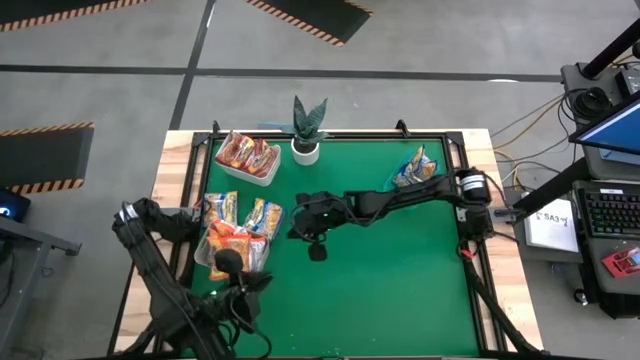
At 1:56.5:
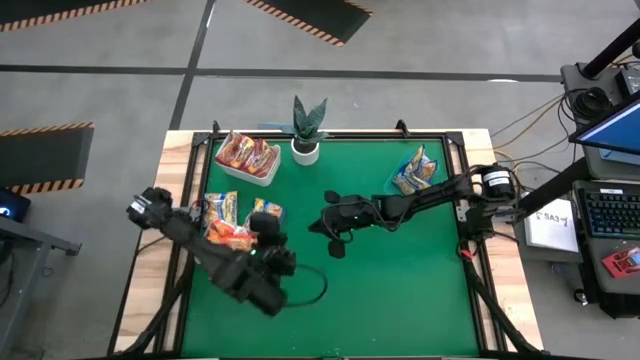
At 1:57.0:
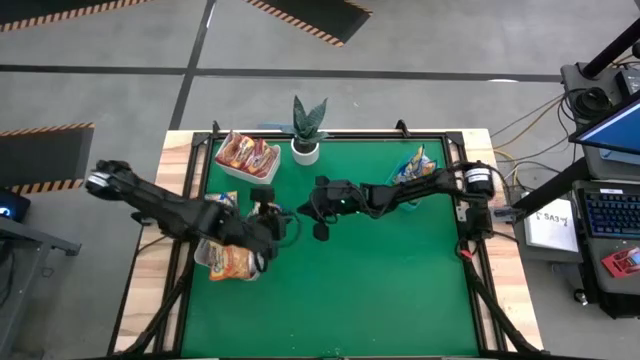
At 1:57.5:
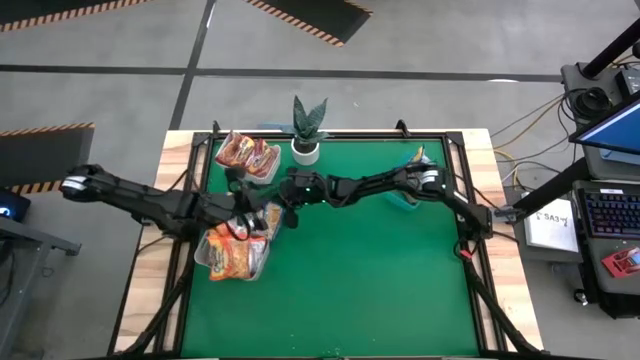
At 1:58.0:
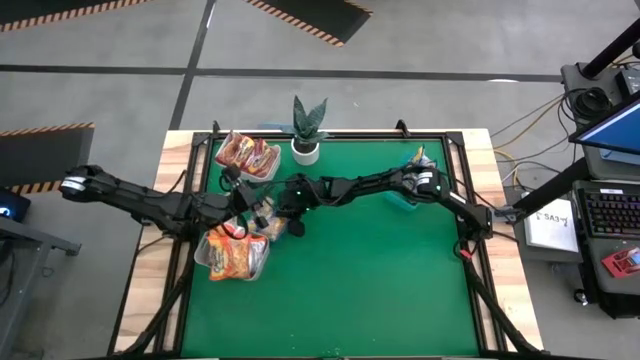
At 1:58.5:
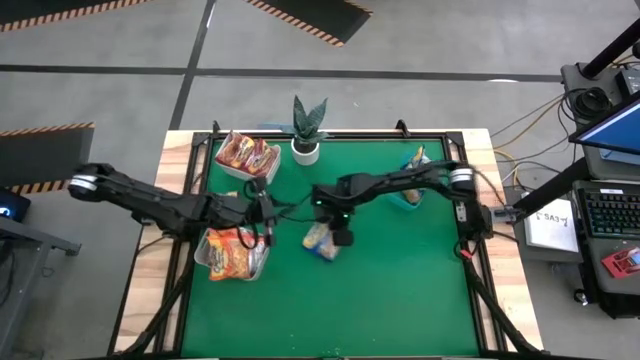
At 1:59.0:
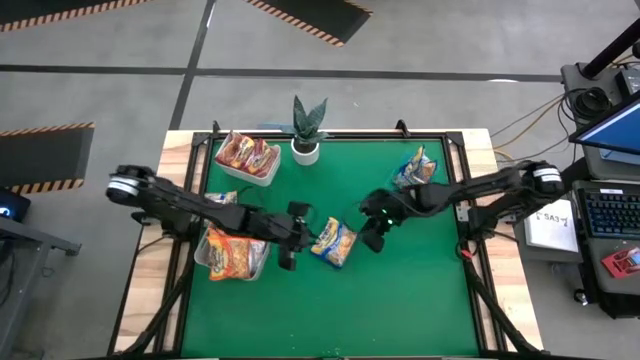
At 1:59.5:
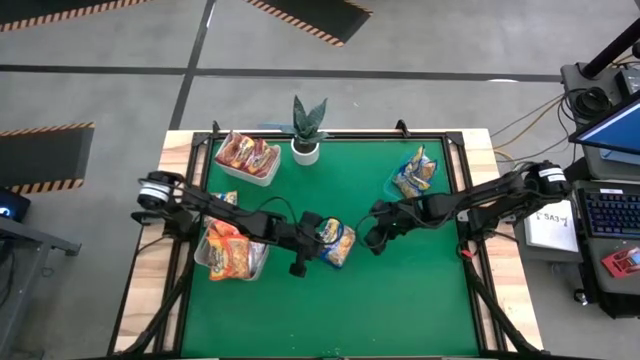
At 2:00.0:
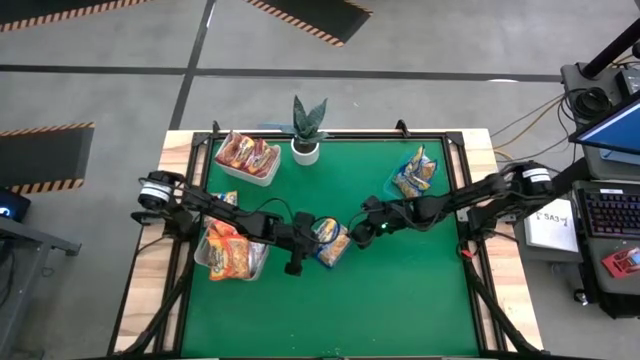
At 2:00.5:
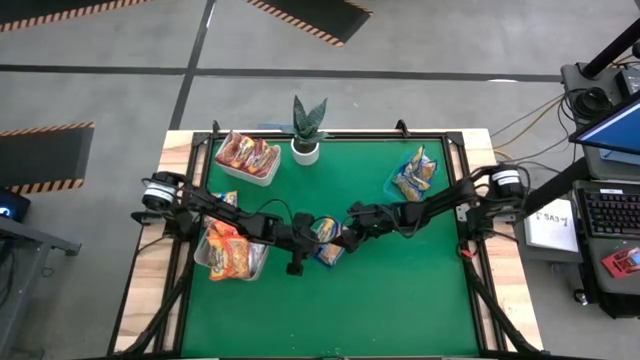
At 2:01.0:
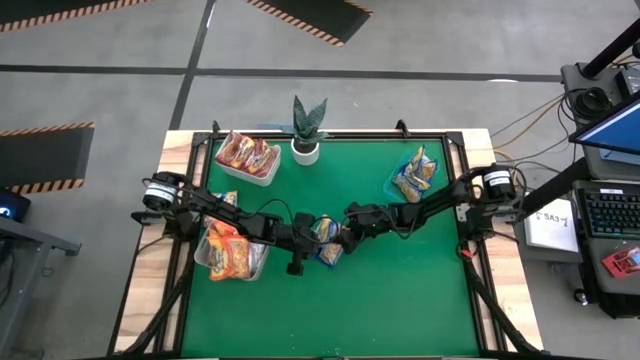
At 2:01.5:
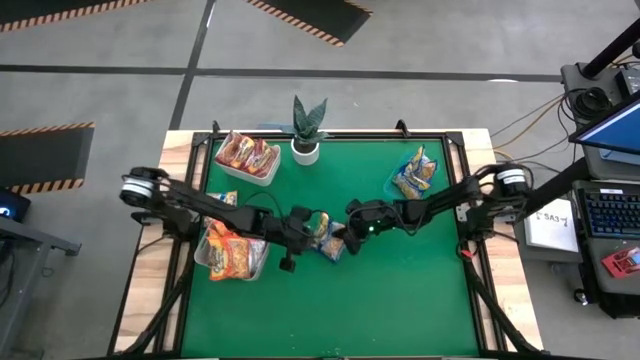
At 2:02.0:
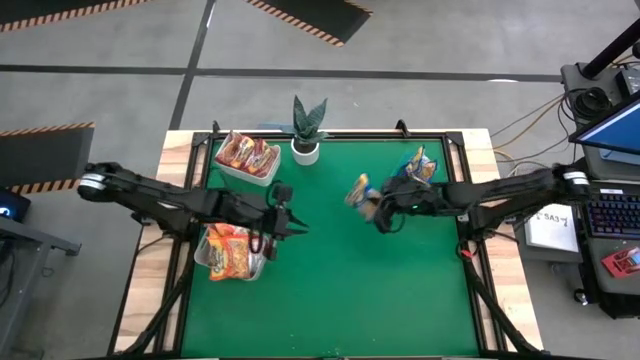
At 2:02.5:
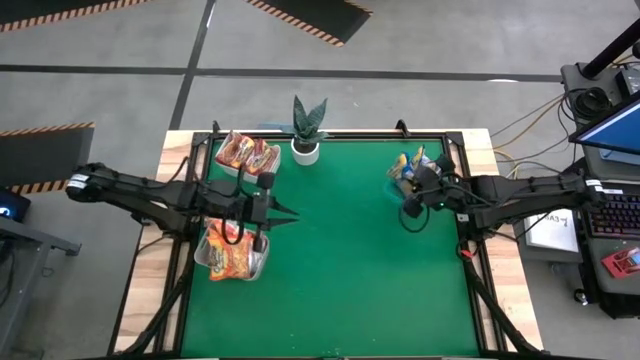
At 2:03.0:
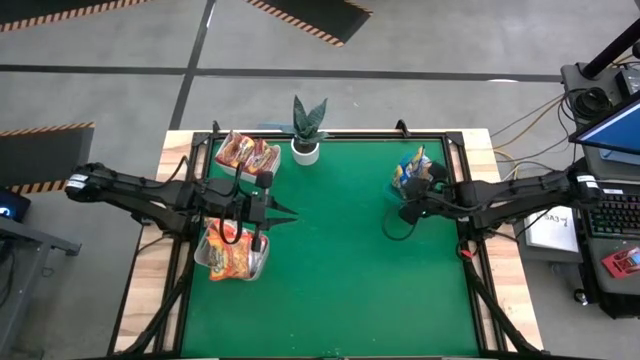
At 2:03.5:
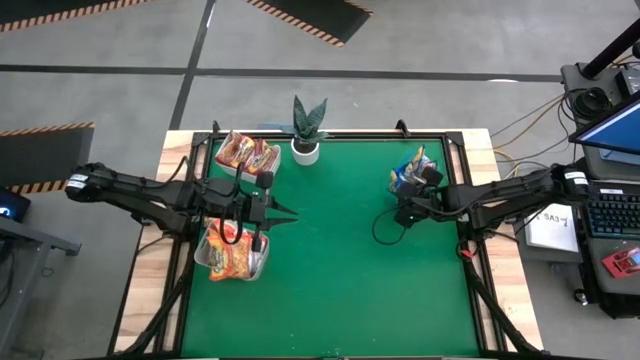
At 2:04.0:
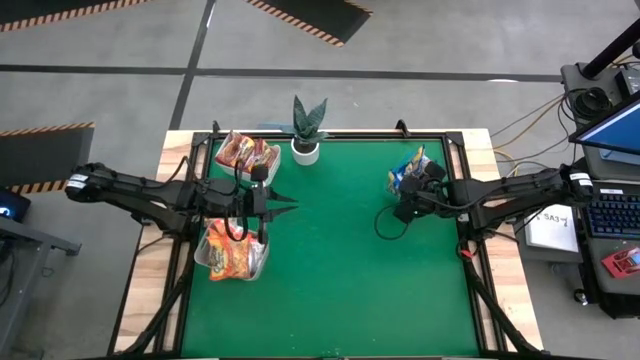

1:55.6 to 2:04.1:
Task: Sort Maruchan noodles
Put the blue noodle pack into the blue bin

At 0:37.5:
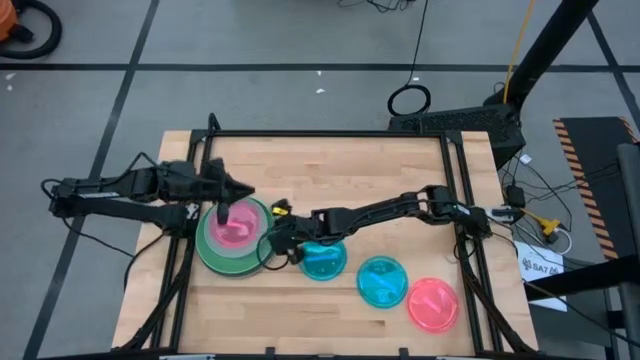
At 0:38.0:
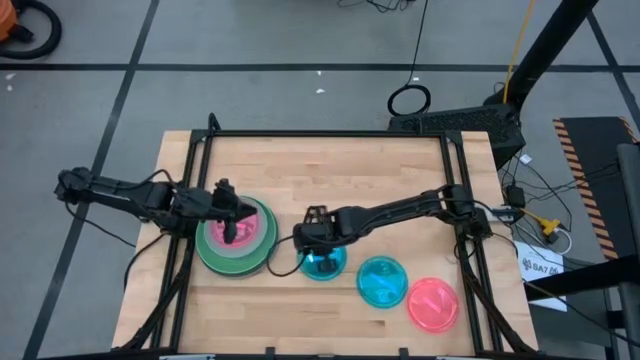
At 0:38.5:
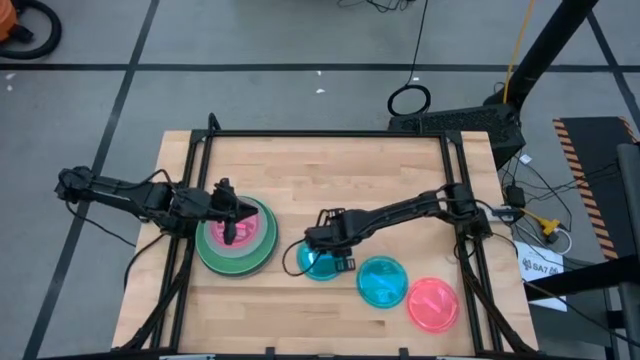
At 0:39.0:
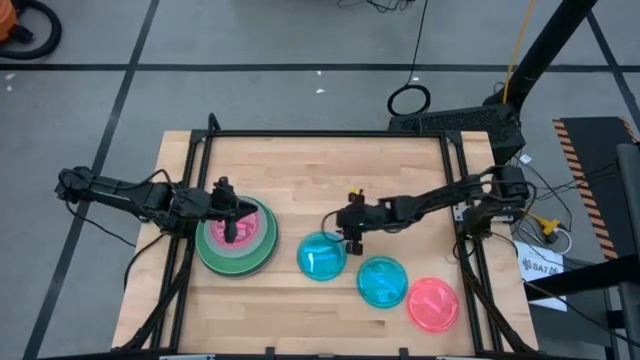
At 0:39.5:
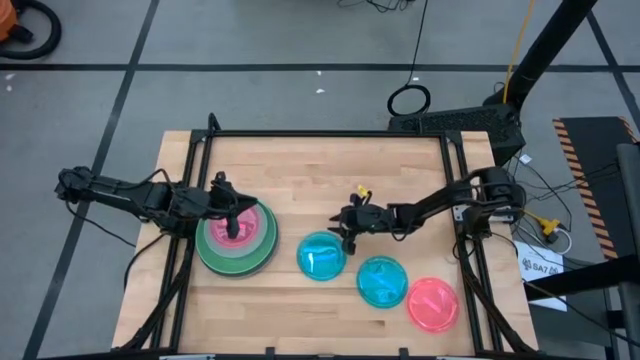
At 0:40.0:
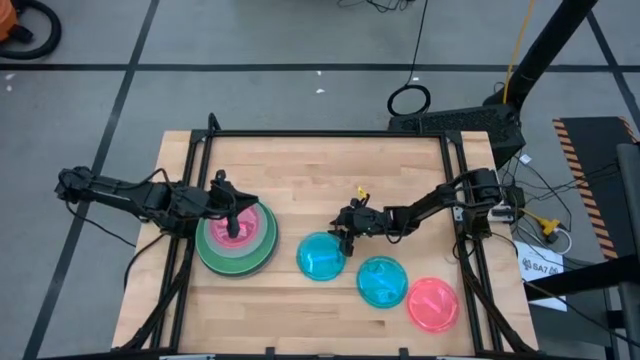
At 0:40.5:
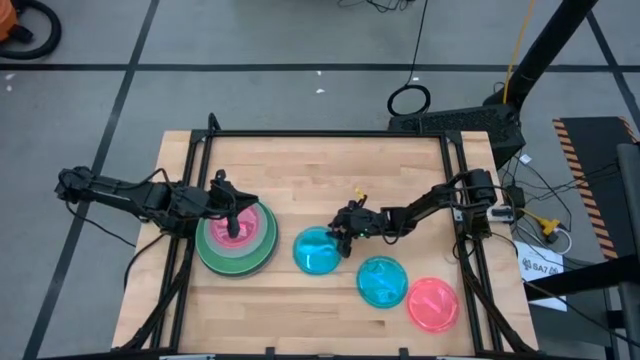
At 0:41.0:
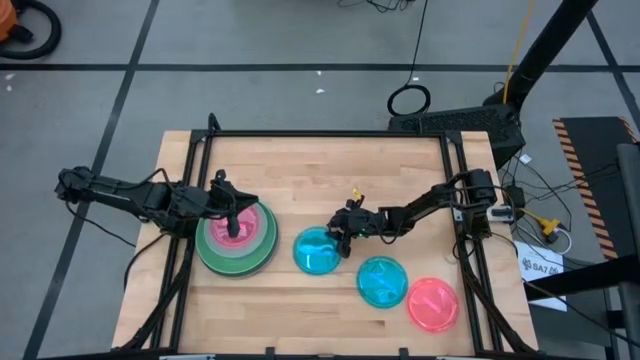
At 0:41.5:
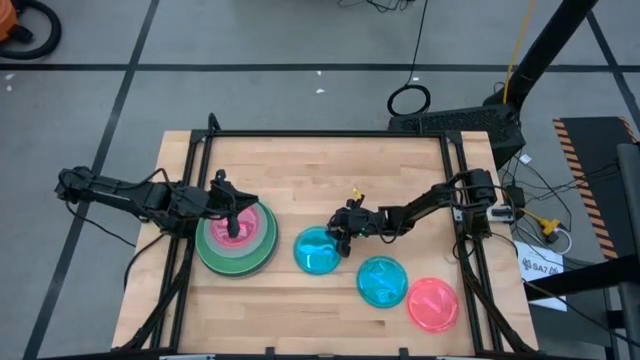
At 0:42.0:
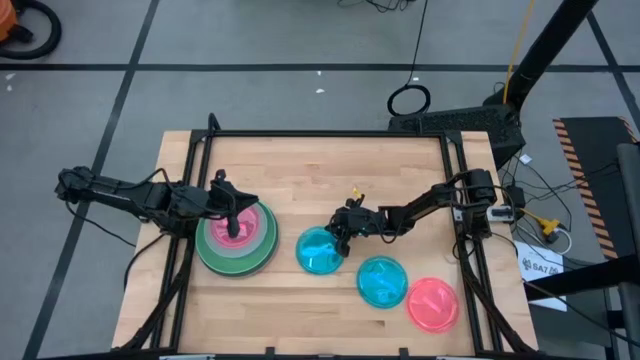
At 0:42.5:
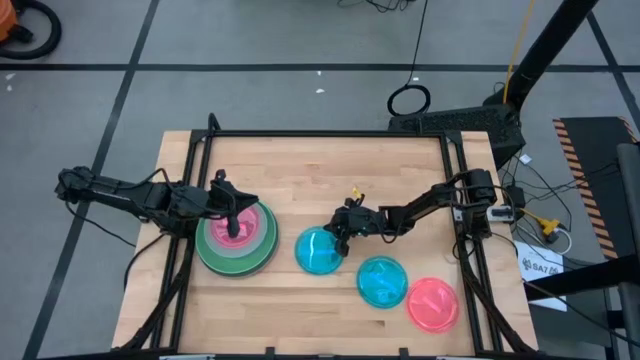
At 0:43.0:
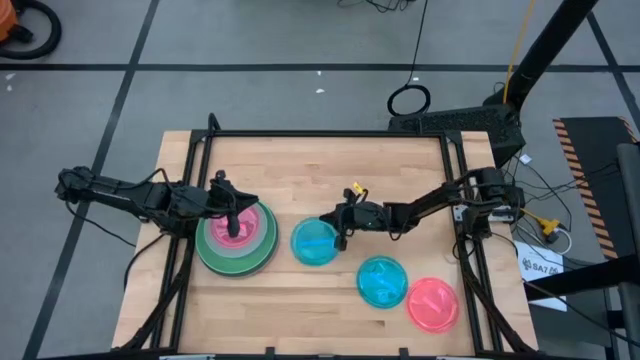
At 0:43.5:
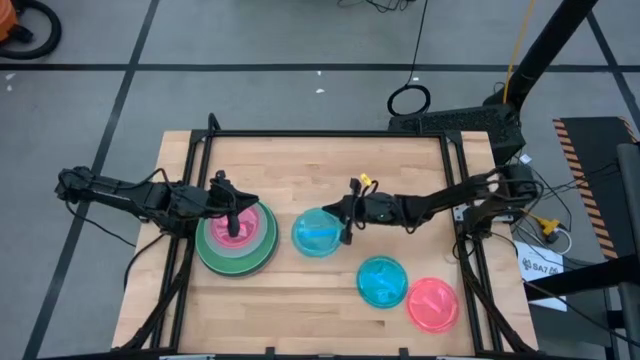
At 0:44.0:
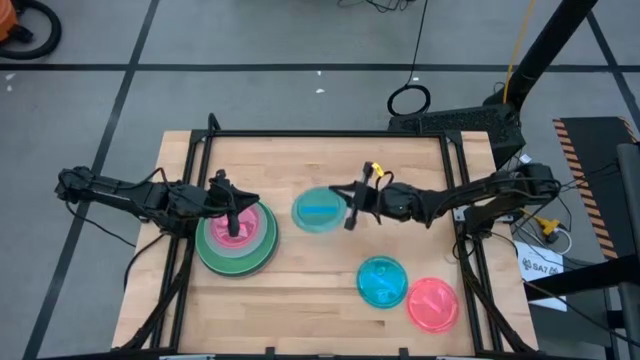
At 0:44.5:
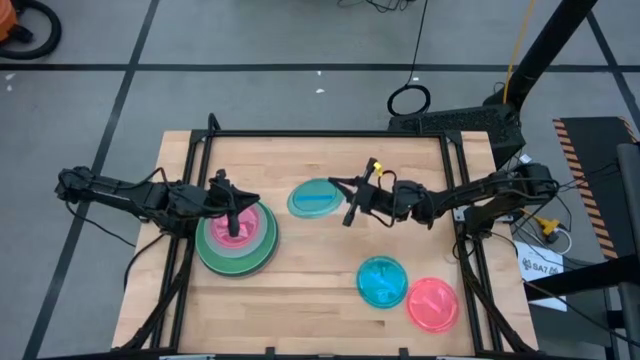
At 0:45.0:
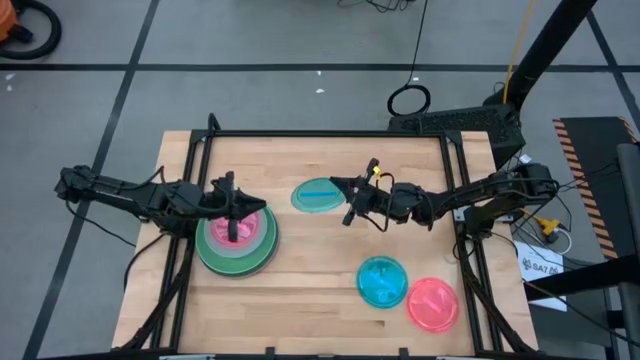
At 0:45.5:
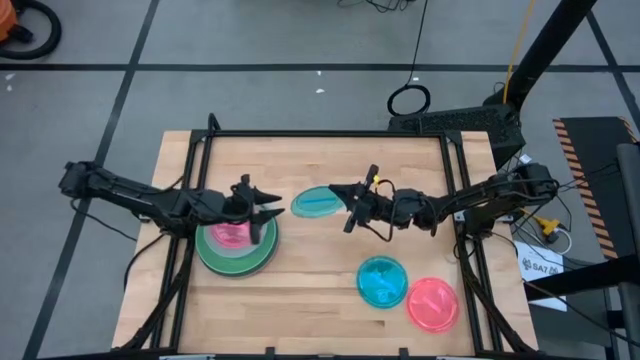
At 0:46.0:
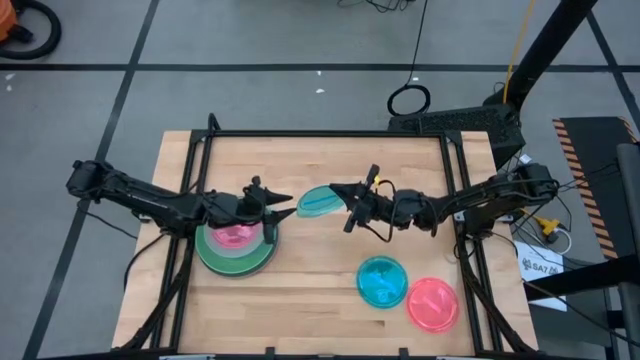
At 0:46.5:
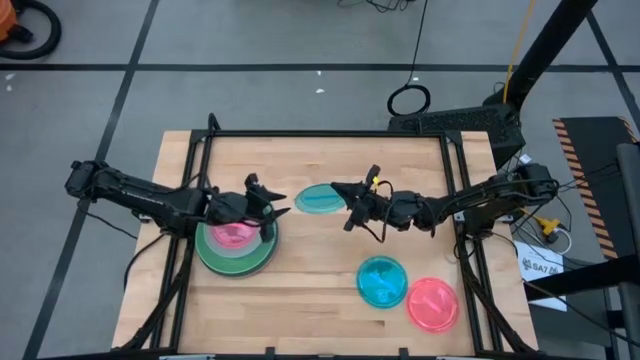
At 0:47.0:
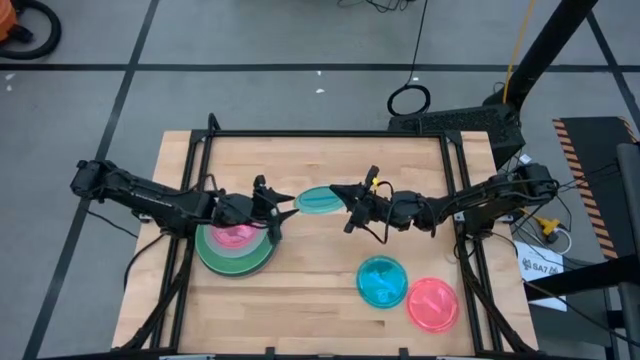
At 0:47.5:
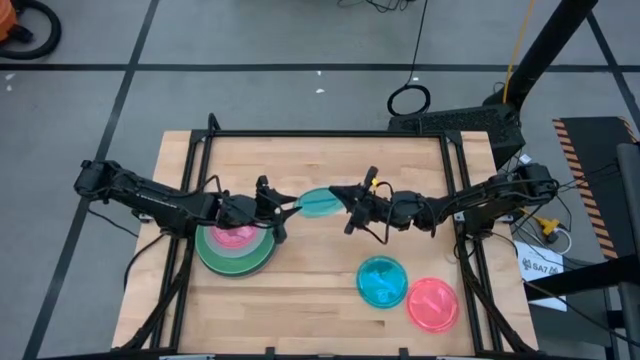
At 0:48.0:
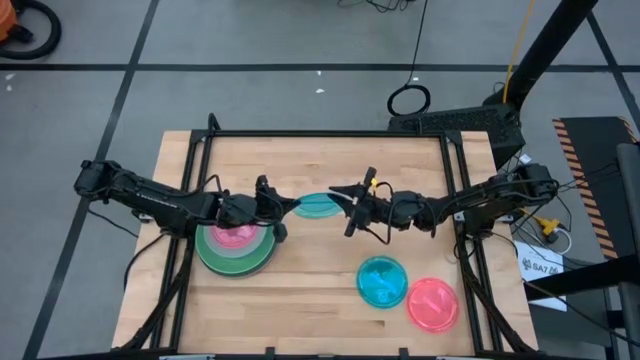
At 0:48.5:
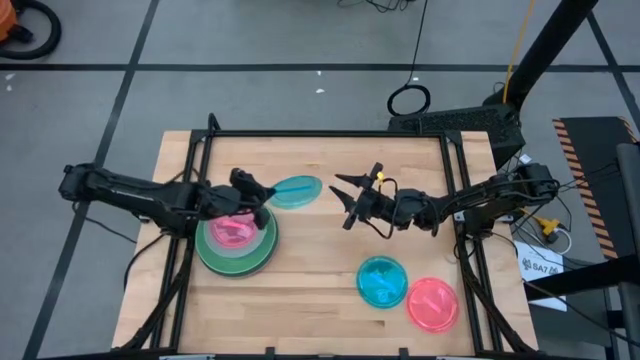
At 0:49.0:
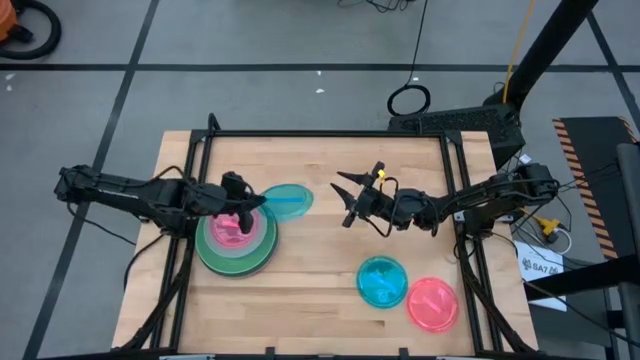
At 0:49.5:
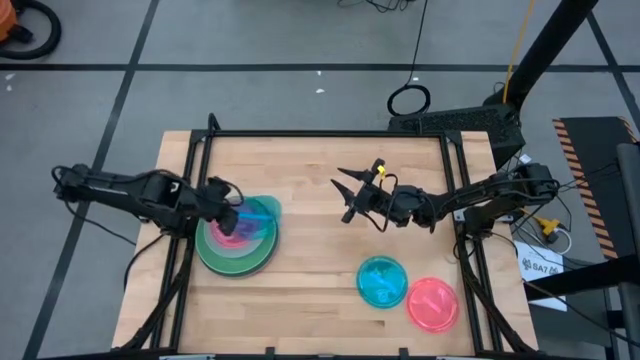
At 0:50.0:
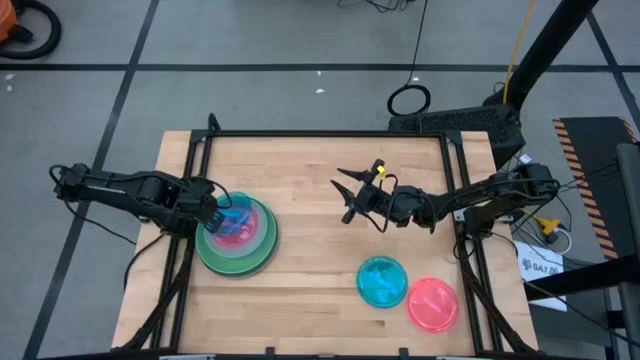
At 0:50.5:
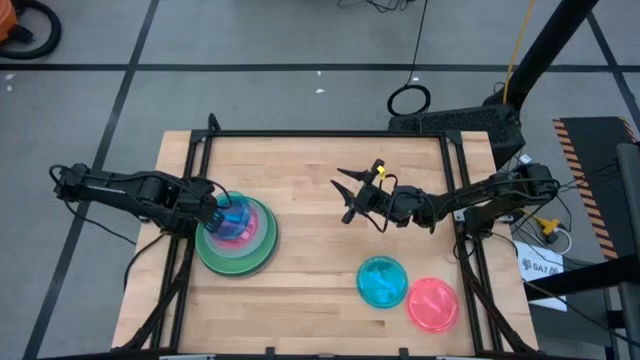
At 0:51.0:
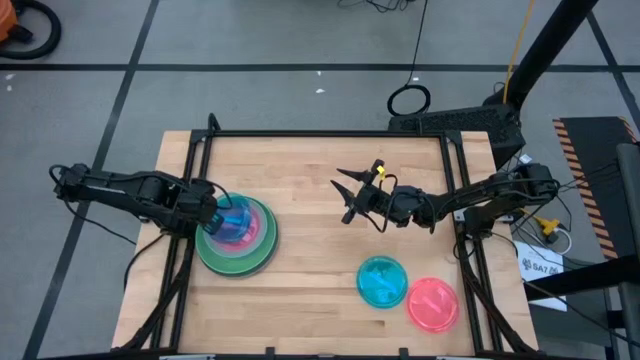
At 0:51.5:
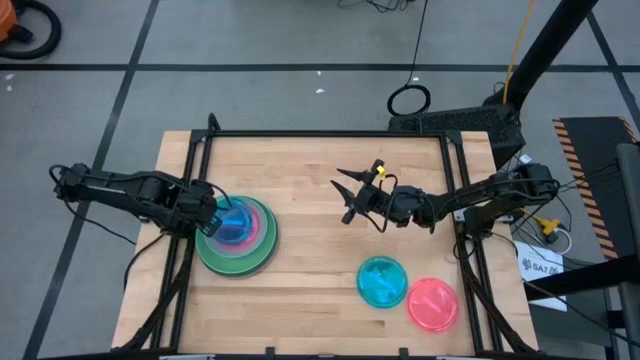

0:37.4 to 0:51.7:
Task: Stack plastic plates
Stack the top light blue plate on top of the light pink plate
